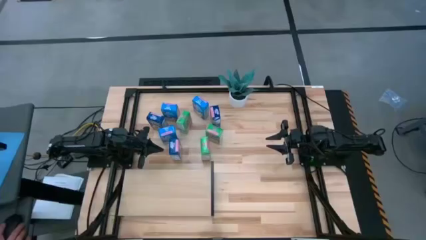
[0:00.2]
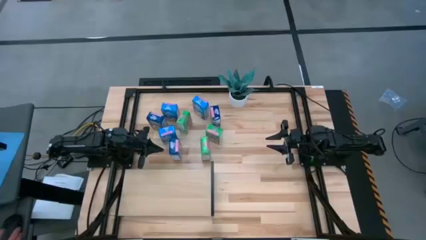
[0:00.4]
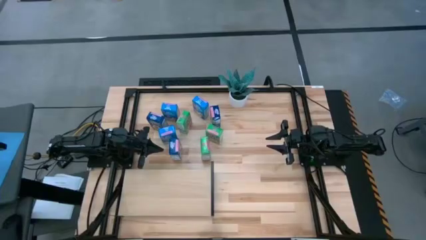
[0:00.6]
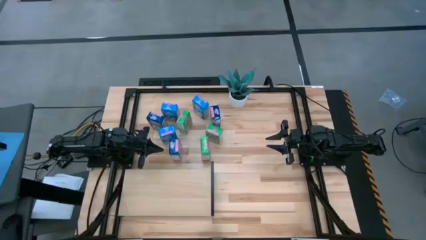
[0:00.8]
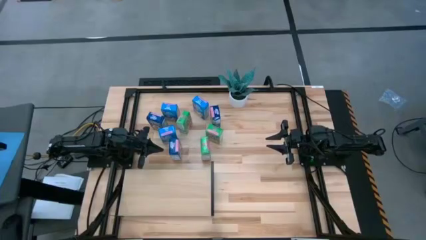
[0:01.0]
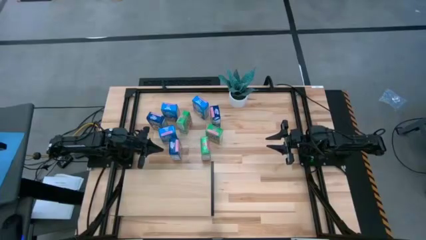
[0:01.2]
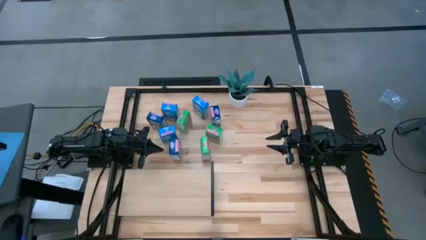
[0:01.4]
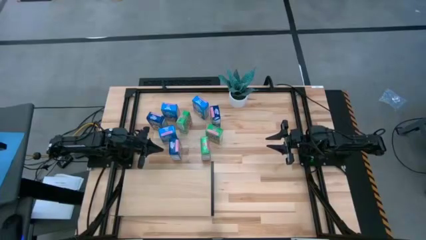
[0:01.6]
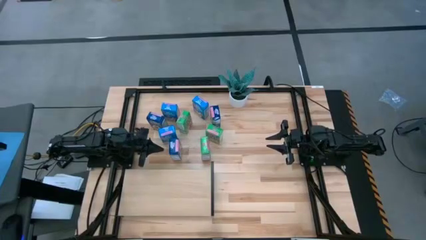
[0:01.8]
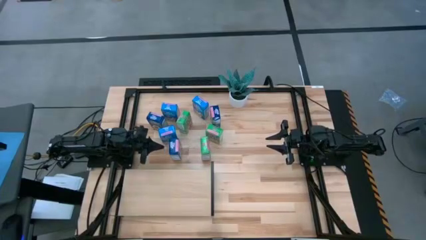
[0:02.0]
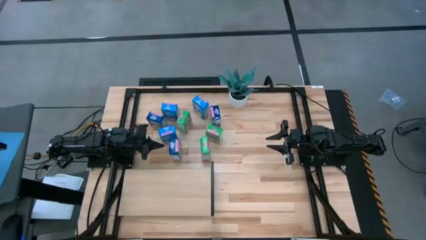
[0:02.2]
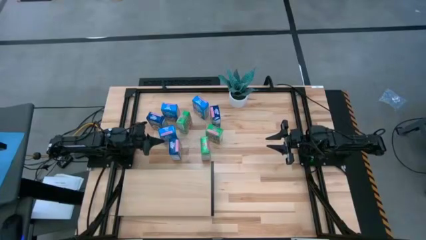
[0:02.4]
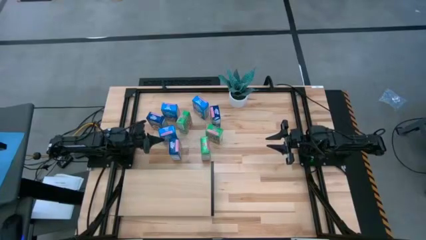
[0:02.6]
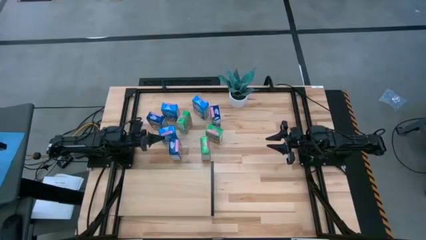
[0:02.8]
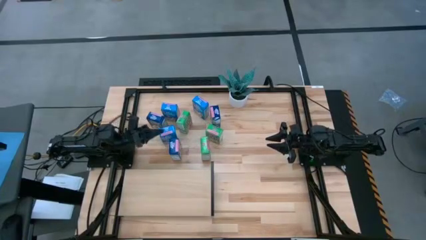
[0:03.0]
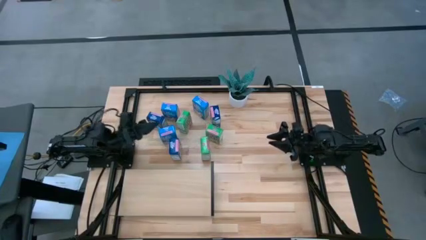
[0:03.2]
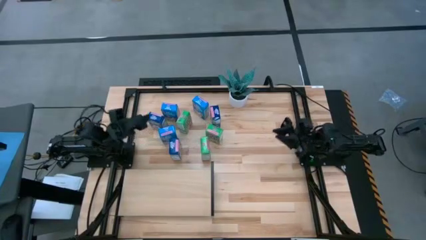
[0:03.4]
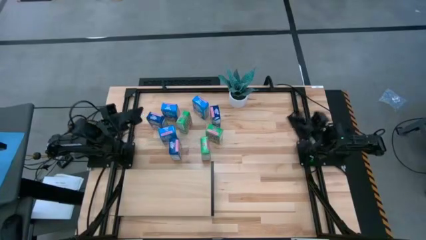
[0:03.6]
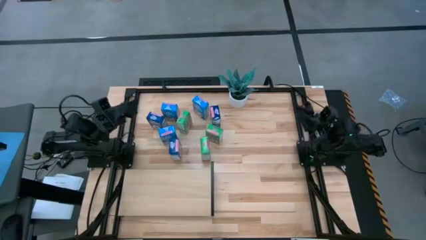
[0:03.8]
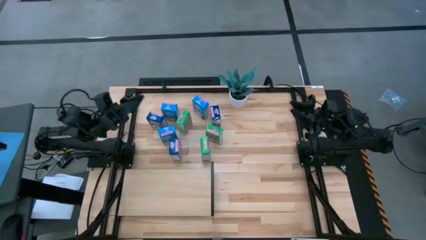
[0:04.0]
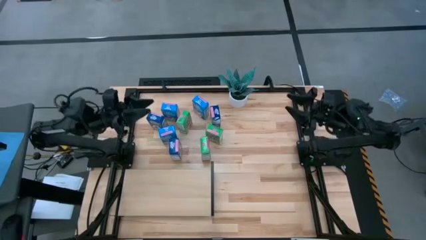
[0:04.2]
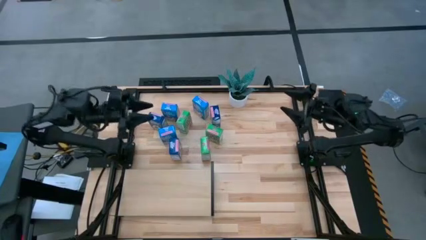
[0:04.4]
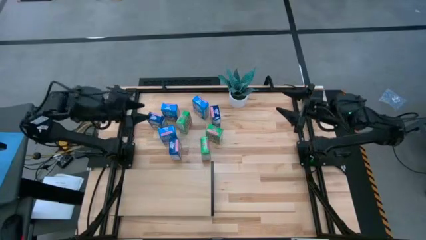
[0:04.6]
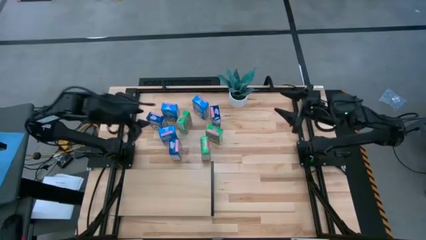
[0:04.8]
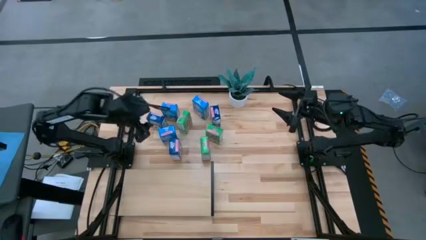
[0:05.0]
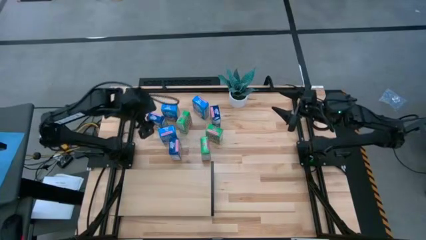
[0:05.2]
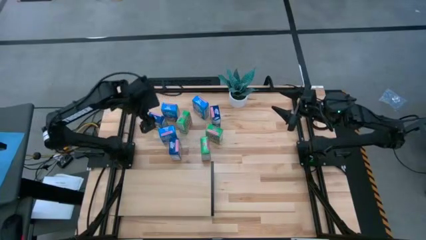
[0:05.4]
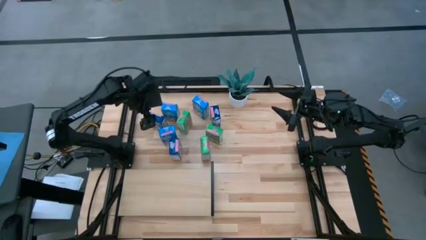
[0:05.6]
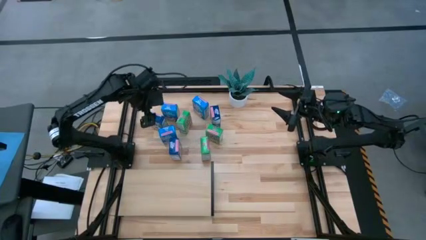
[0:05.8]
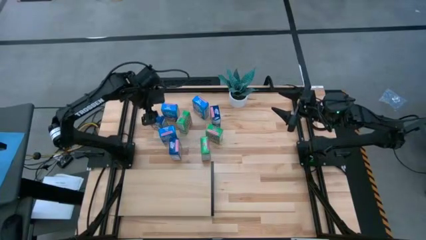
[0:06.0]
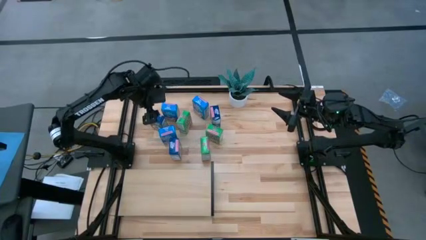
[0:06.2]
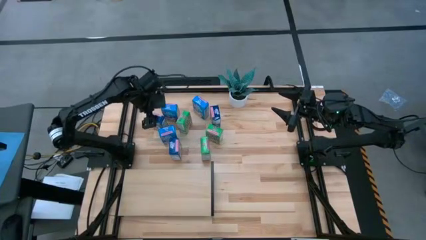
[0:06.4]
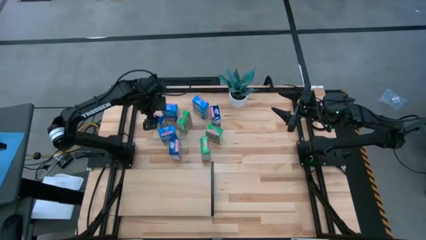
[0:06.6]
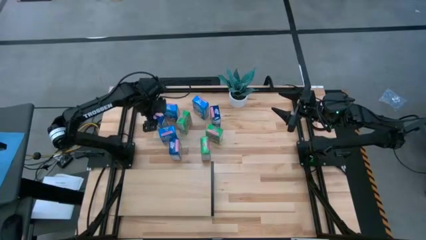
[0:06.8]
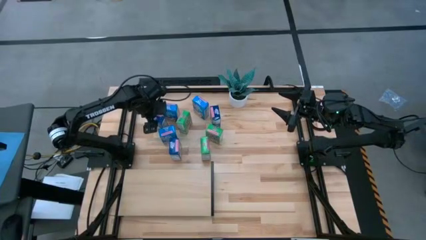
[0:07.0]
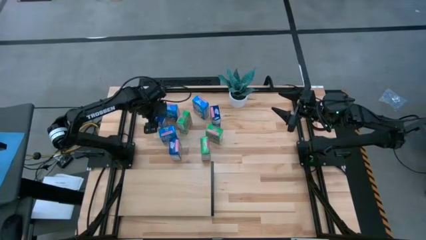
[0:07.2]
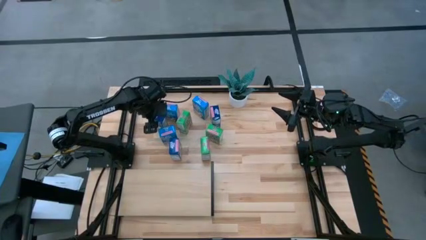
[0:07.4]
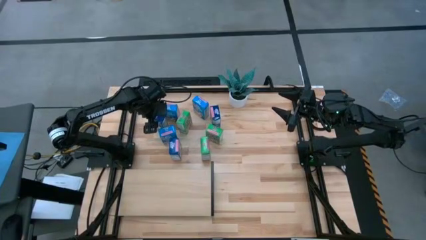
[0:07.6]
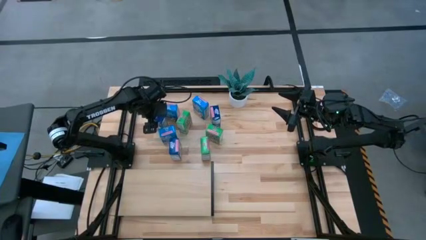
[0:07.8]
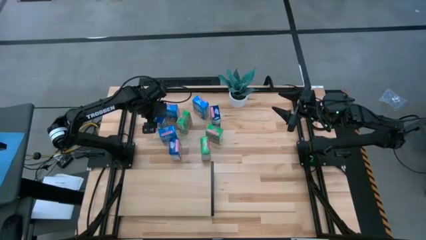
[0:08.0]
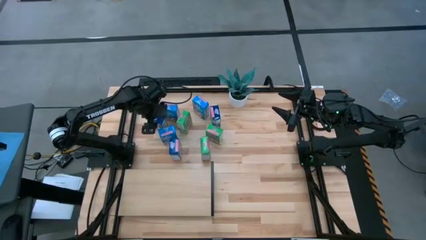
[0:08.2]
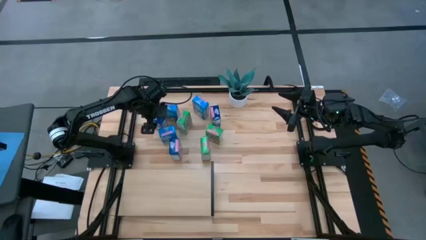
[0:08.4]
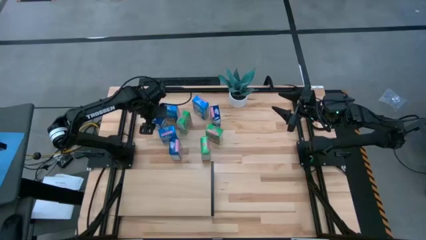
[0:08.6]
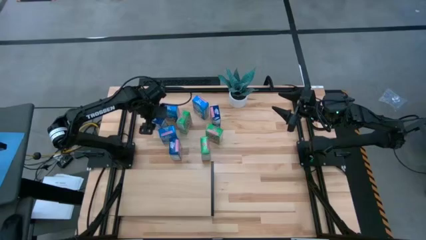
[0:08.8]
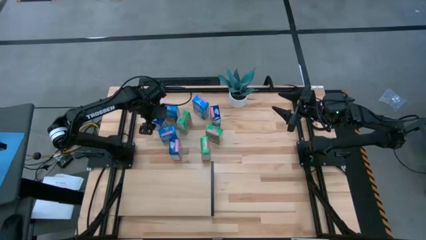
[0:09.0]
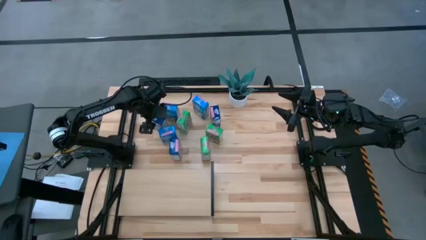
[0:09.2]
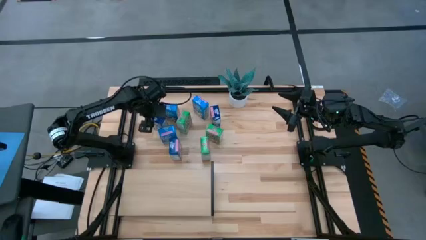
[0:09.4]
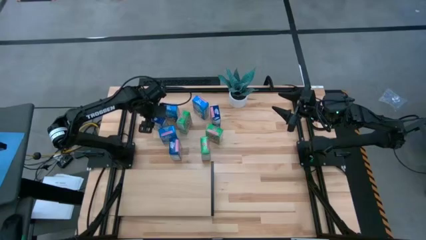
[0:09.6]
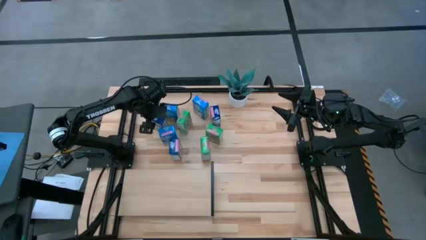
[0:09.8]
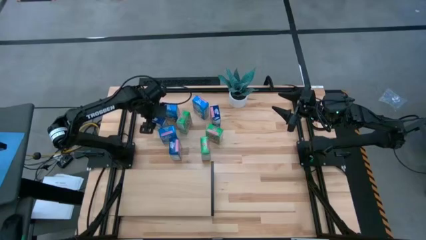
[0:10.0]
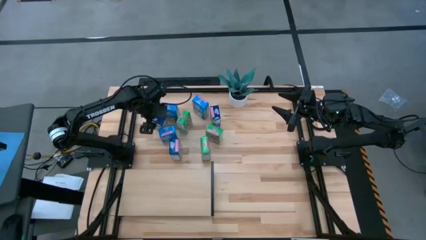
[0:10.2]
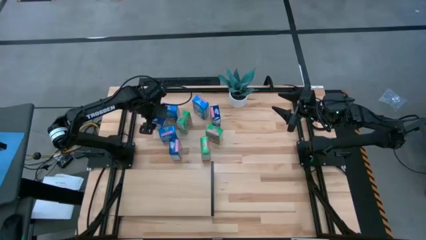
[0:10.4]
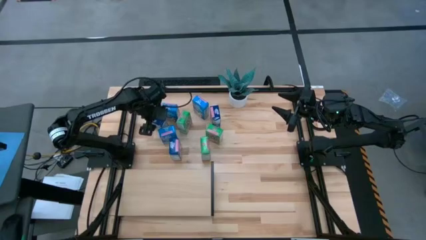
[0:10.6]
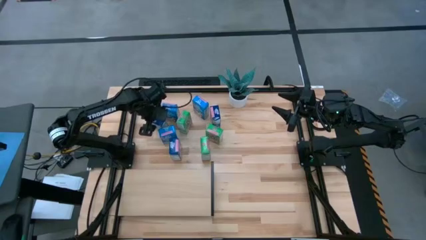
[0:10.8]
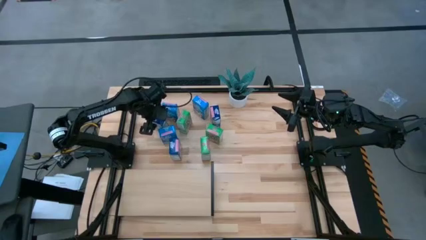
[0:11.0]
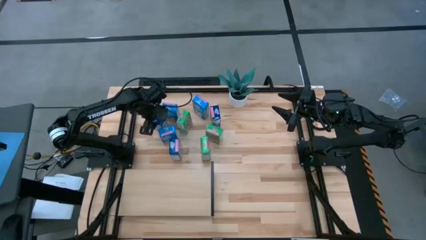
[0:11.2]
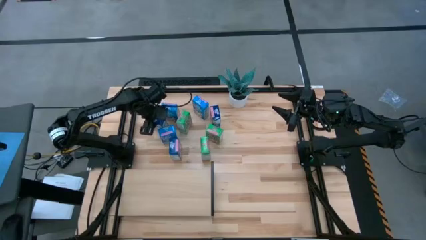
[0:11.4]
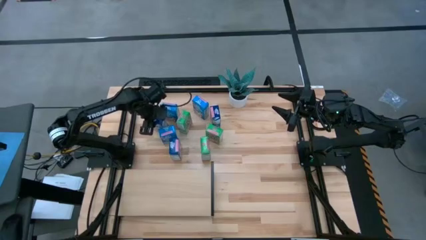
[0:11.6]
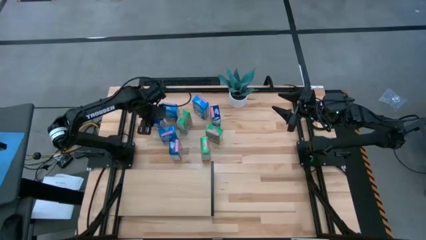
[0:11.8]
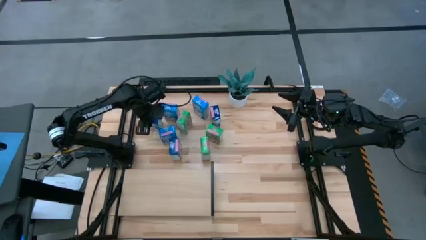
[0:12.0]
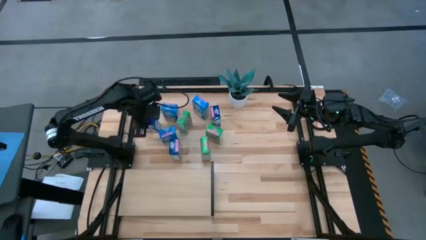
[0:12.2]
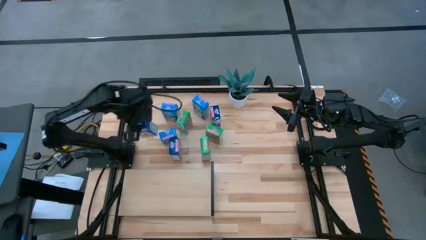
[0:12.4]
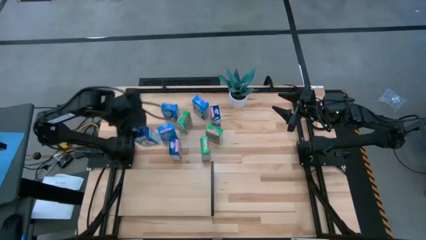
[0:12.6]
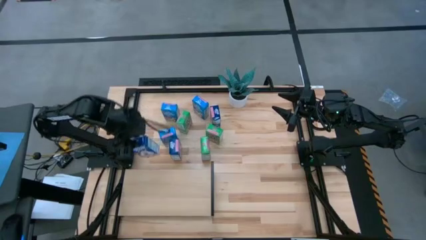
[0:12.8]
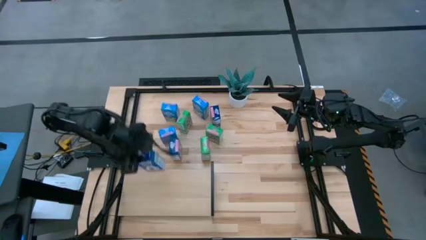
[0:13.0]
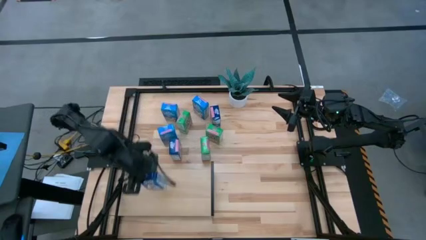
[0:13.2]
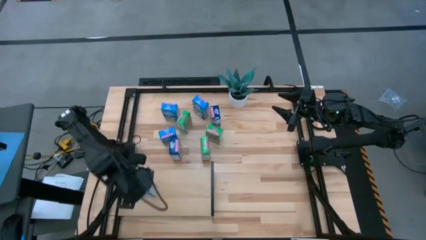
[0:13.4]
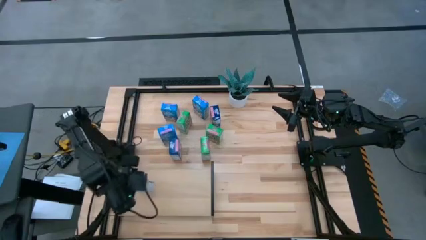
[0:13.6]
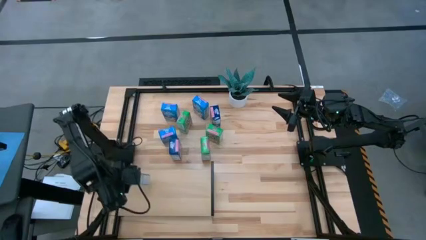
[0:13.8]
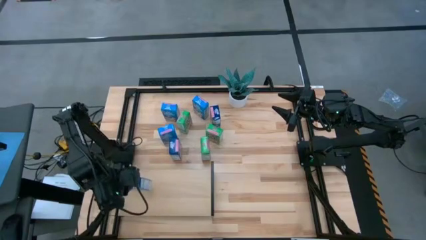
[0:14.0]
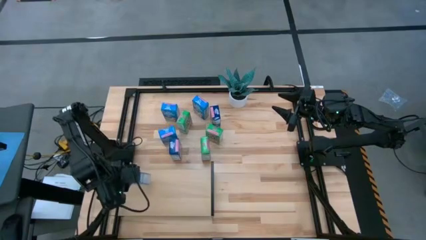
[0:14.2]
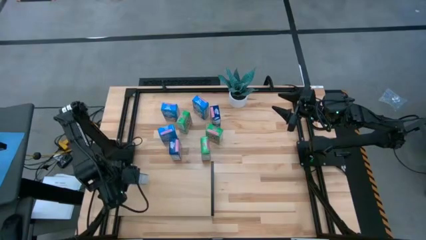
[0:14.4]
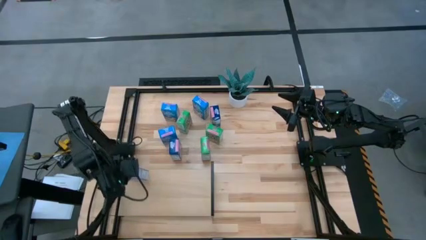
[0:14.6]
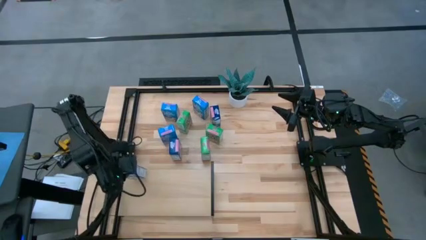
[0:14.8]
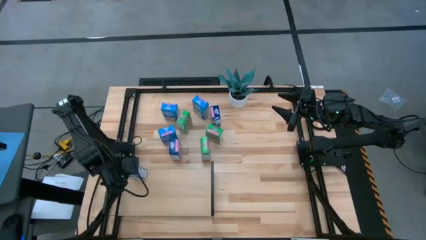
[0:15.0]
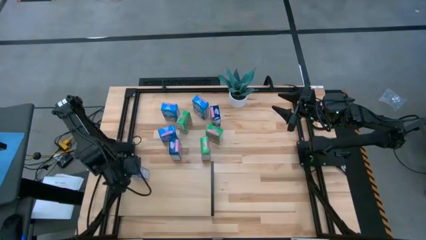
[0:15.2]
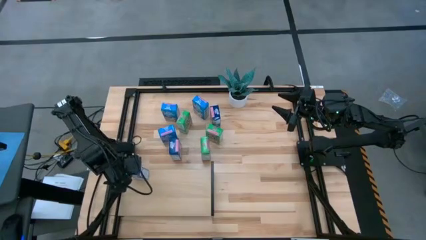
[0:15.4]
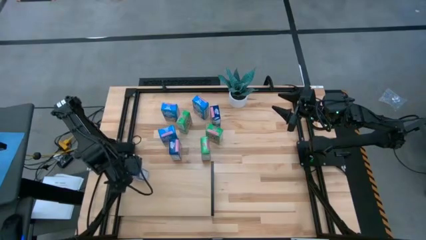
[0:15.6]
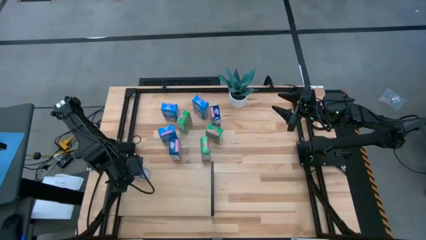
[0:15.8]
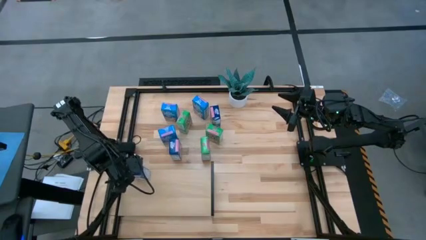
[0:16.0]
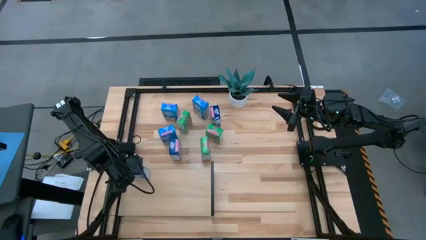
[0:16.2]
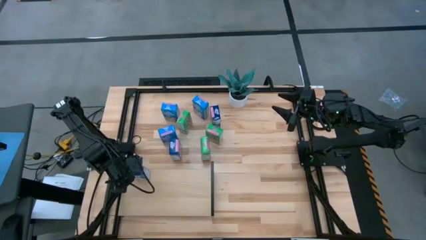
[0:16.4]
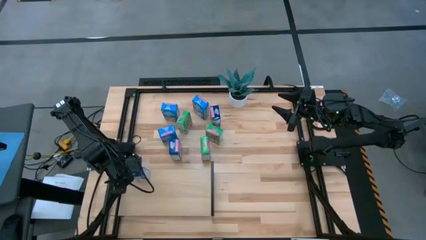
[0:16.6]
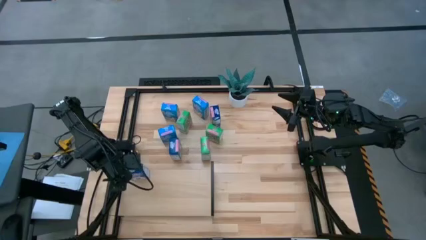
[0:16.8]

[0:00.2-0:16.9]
Task: Stack cereal on shelf
Put the left blue cereal box on the shelf
